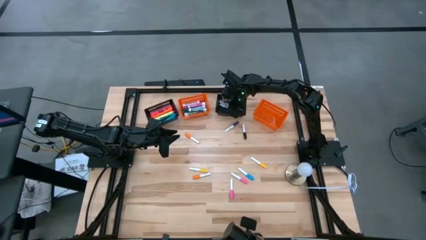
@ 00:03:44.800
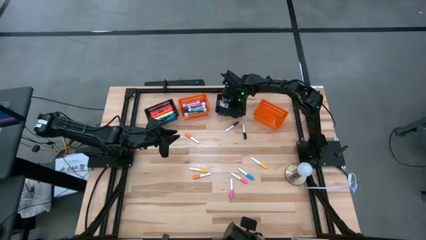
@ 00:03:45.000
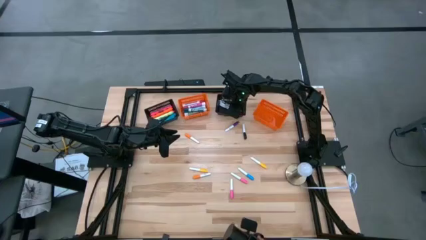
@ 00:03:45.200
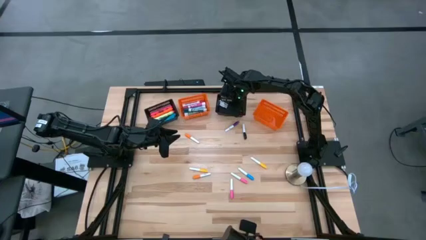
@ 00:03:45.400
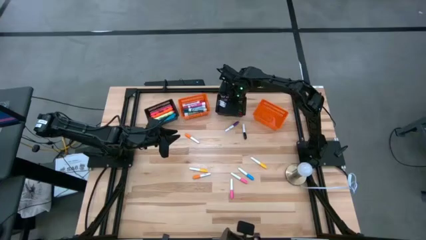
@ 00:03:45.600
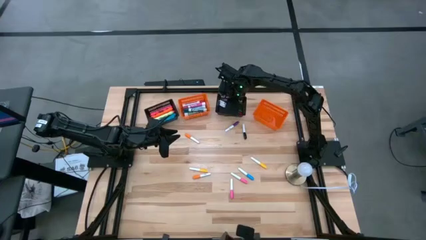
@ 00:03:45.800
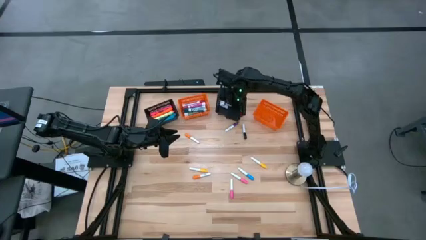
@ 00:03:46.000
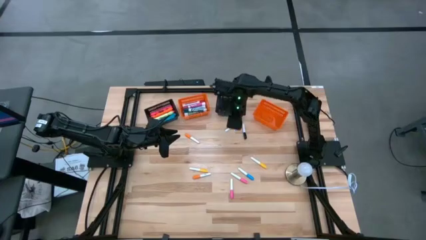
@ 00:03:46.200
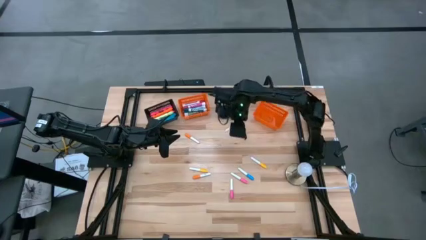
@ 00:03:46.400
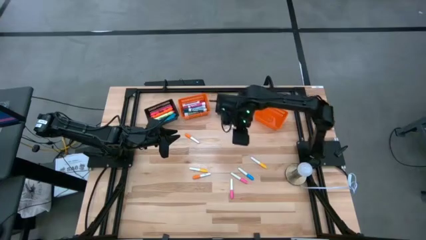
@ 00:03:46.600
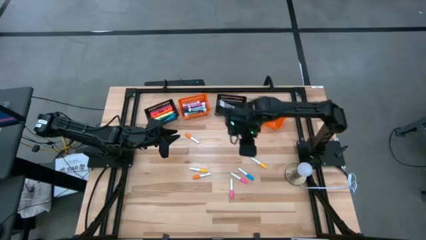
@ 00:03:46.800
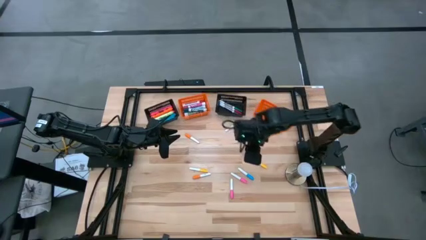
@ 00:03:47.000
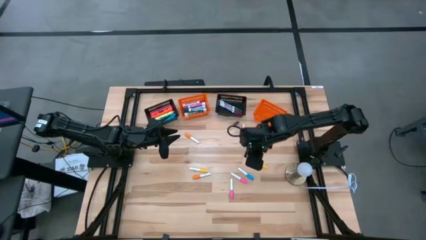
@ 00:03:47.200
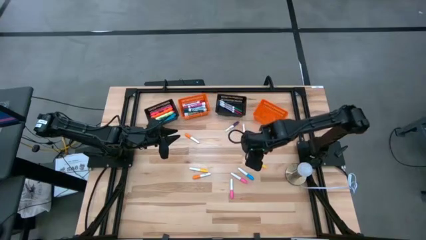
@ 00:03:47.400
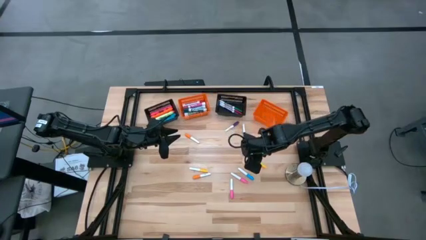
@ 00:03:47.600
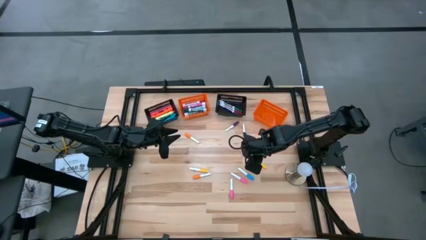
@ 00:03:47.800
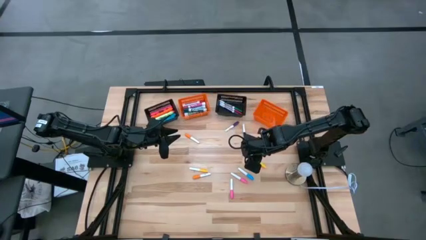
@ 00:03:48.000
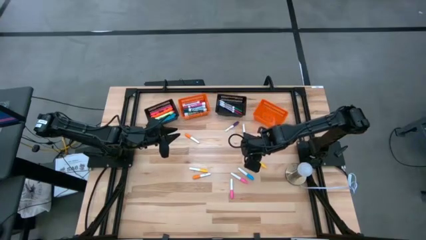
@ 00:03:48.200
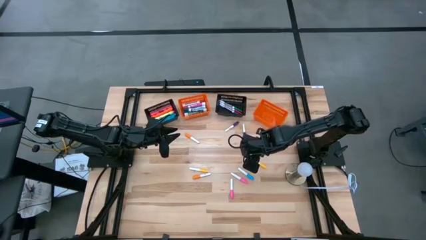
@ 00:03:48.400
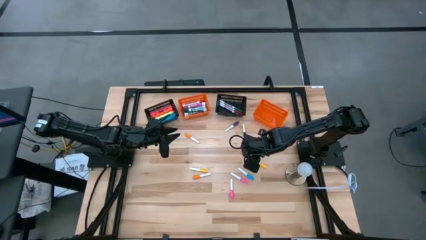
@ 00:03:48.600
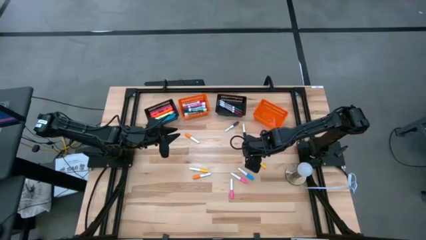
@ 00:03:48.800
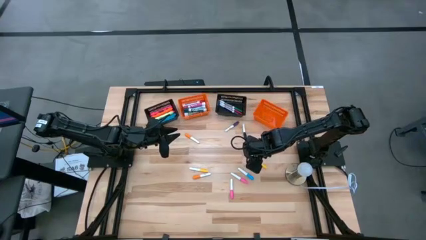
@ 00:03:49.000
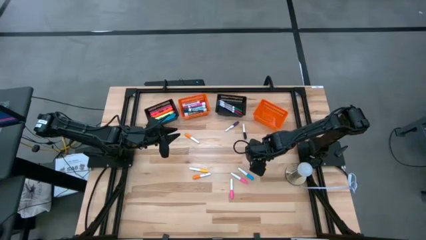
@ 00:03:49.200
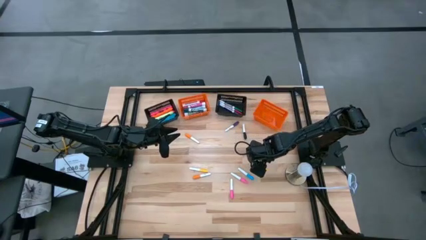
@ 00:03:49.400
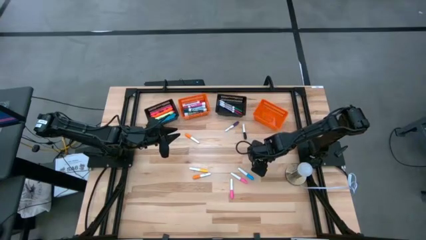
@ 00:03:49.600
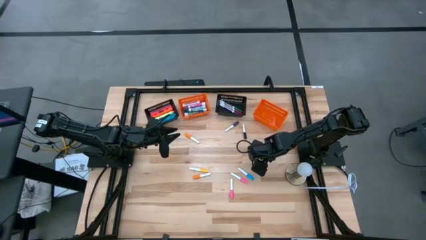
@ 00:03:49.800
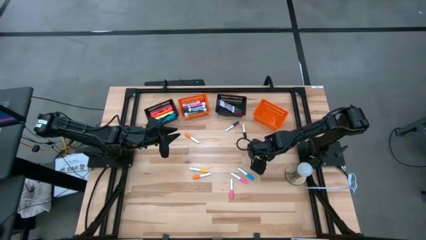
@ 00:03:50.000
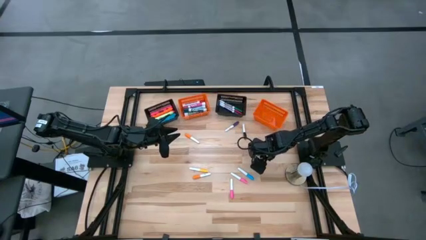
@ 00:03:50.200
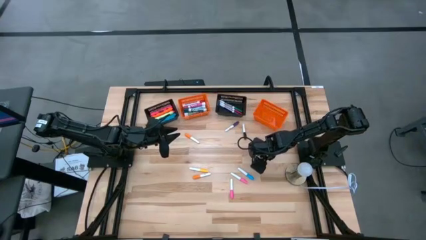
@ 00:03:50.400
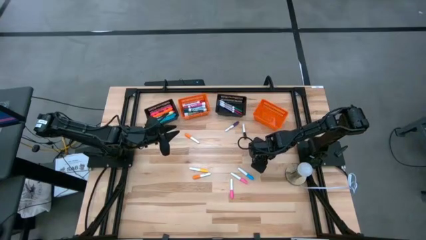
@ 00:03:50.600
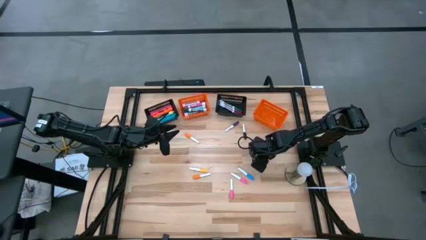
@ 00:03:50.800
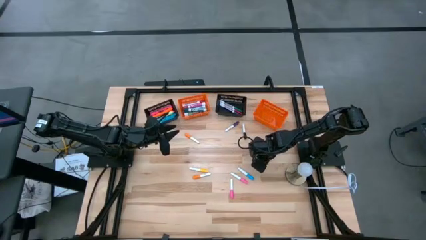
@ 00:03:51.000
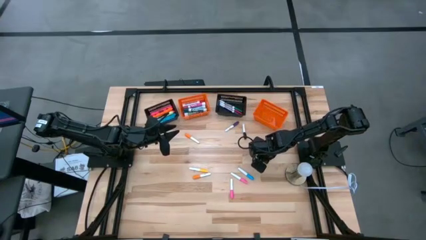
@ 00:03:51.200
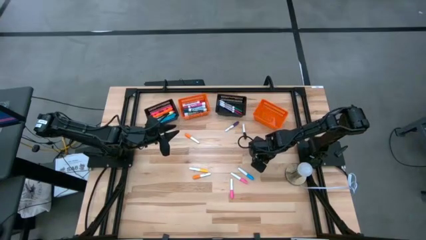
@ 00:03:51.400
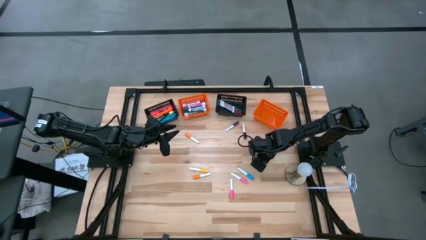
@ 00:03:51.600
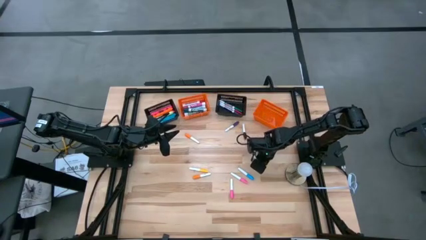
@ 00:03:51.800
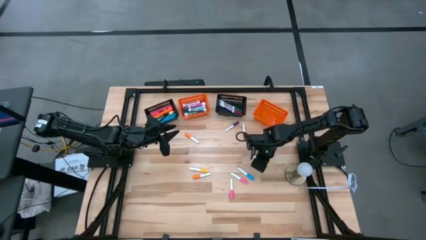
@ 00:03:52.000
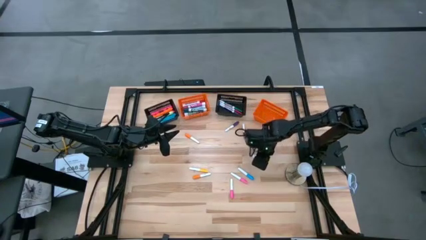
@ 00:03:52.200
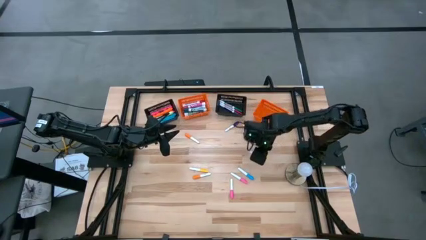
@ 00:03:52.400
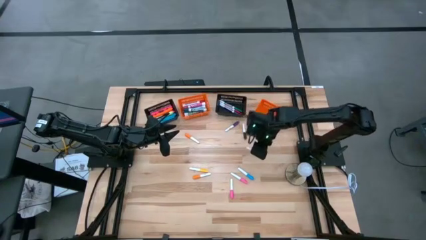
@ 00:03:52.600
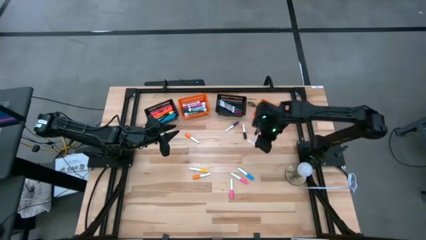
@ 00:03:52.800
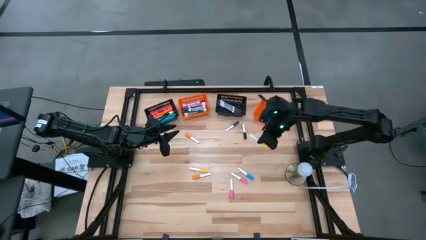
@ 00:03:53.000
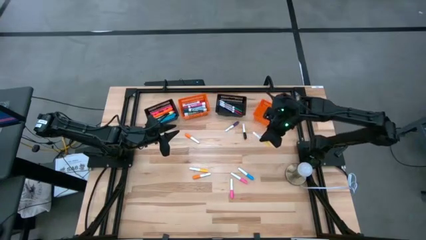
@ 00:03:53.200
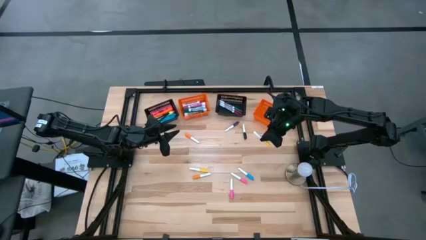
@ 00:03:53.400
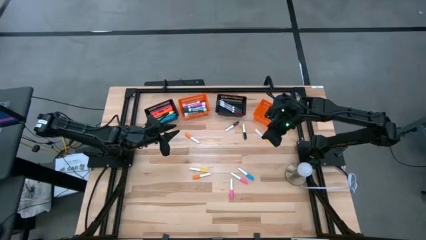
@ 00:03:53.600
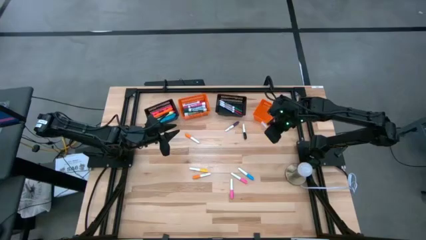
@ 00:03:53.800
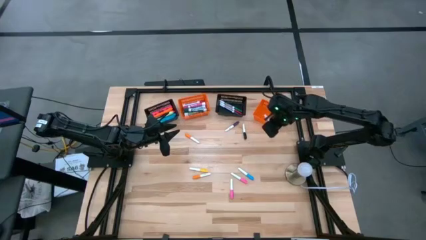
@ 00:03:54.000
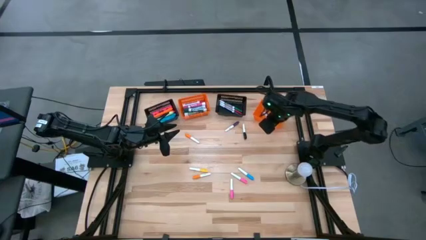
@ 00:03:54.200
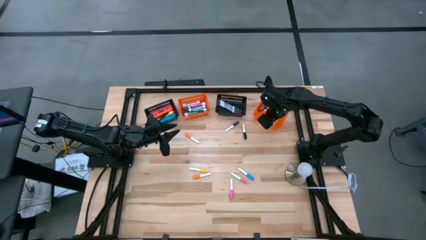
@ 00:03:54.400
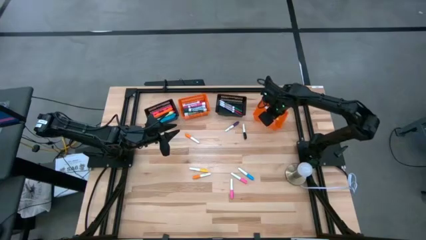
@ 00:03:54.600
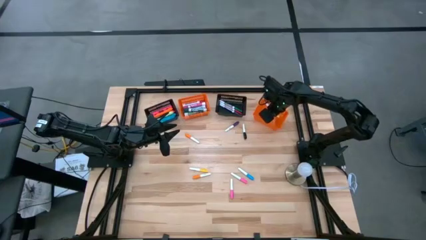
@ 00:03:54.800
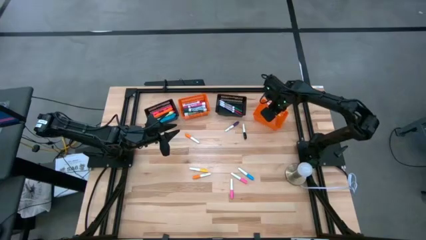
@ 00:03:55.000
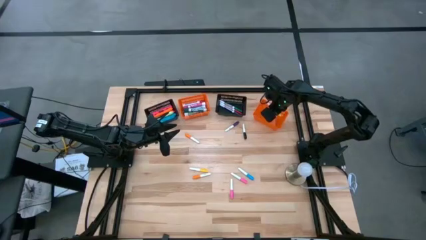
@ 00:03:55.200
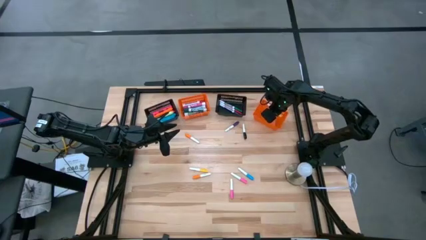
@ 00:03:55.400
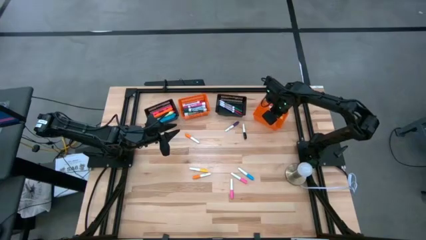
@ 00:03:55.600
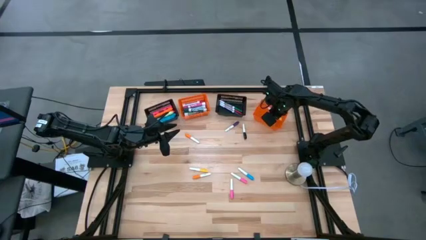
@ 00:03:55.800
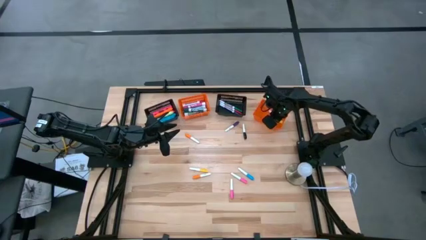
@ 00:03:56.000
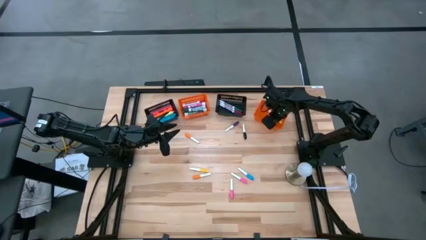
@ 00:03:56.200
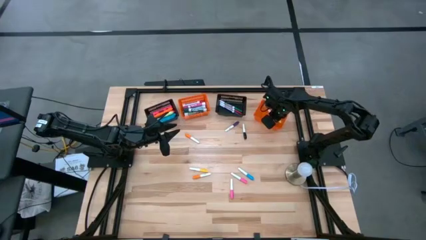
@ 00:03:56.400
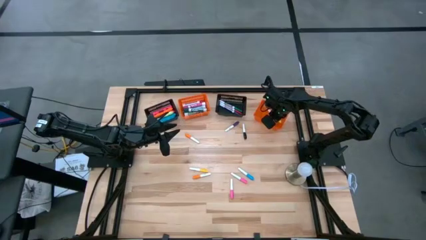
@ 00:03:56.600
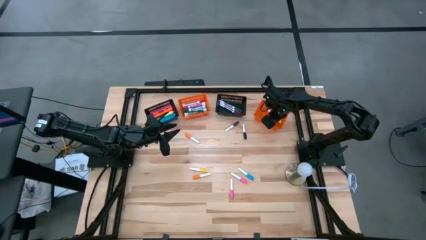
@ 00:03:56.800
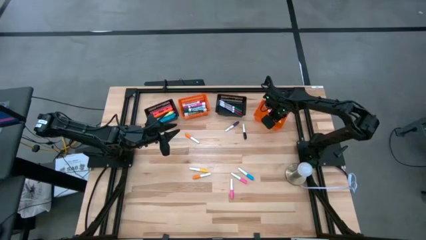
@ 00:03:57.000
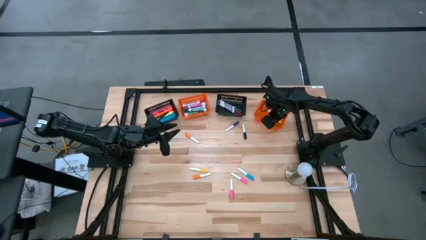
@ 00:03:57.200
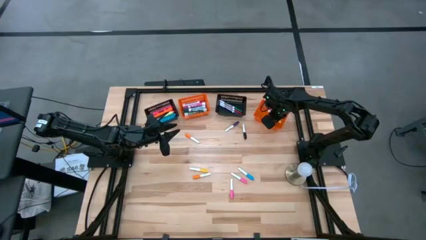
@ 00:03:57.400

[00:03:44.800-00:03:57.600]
Task: Pick & Place Markers
Put the right yellow small highlighter pen into the left orange bin

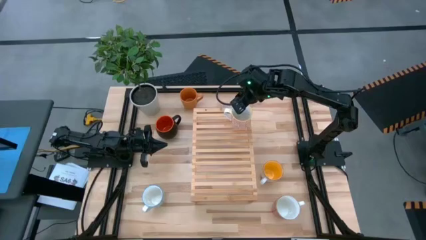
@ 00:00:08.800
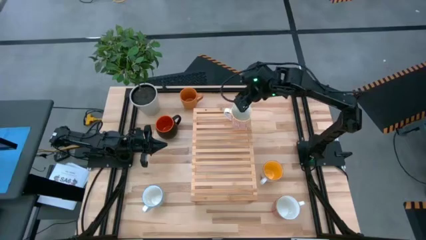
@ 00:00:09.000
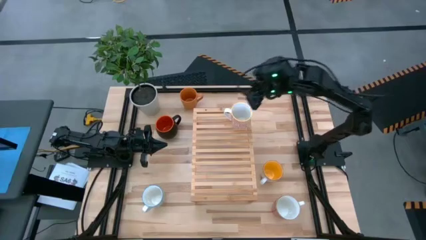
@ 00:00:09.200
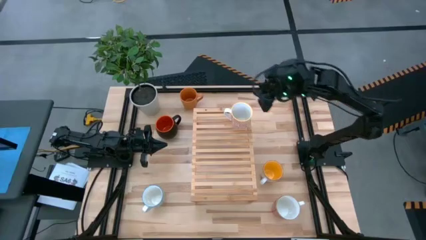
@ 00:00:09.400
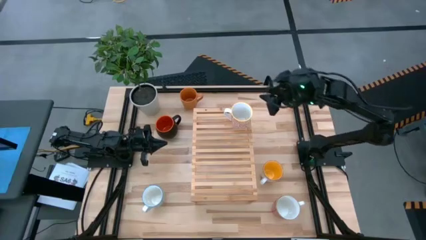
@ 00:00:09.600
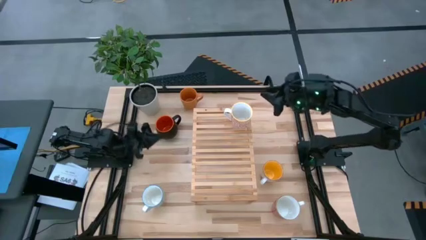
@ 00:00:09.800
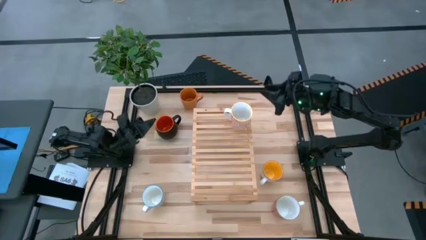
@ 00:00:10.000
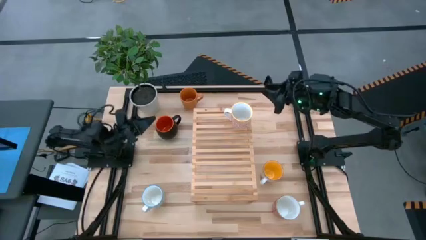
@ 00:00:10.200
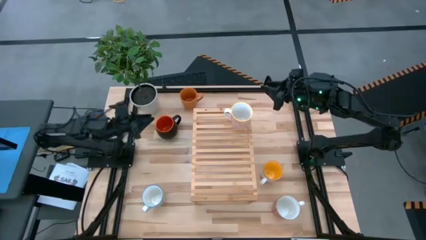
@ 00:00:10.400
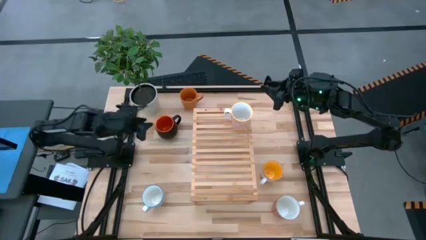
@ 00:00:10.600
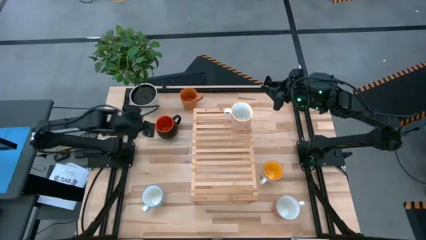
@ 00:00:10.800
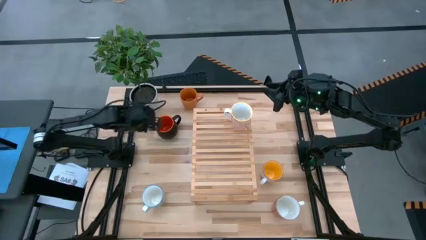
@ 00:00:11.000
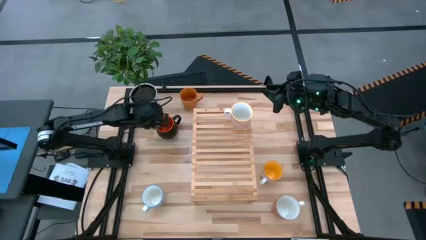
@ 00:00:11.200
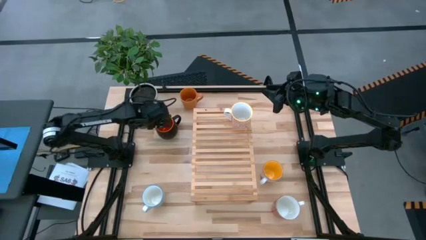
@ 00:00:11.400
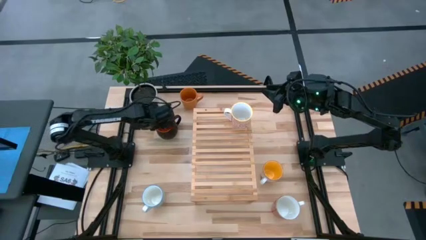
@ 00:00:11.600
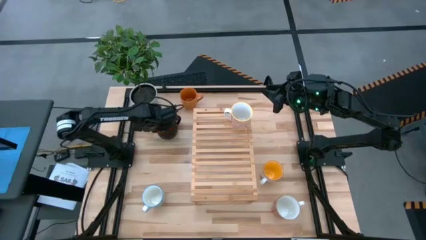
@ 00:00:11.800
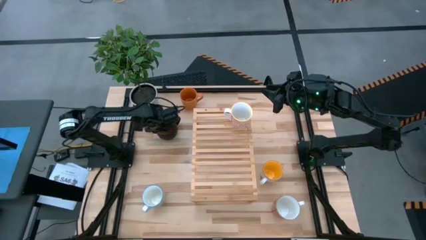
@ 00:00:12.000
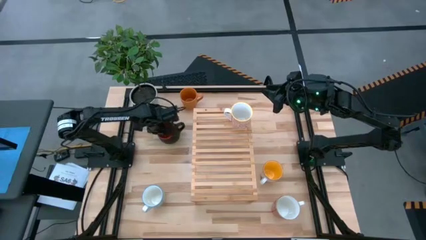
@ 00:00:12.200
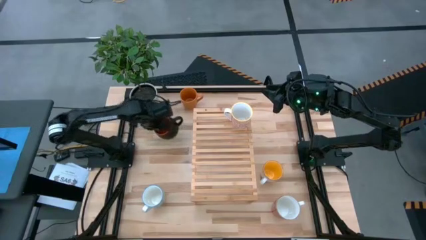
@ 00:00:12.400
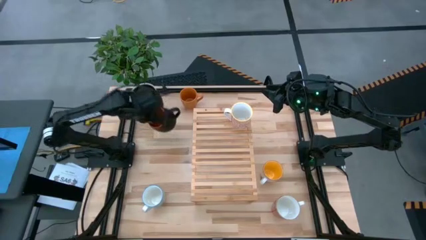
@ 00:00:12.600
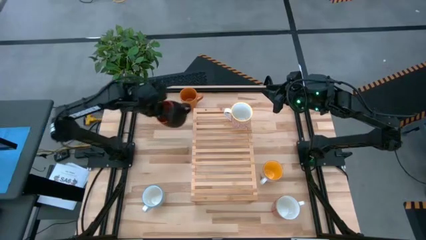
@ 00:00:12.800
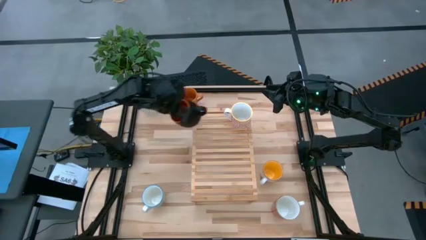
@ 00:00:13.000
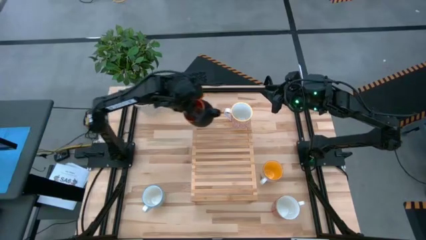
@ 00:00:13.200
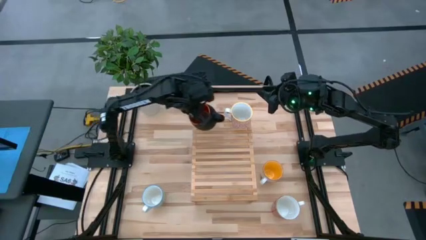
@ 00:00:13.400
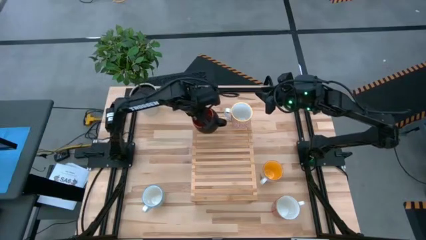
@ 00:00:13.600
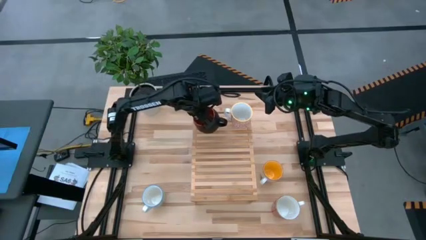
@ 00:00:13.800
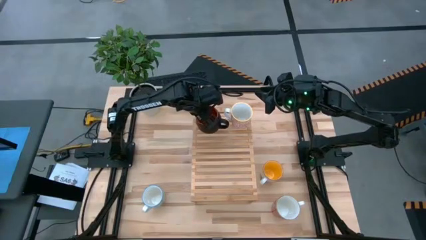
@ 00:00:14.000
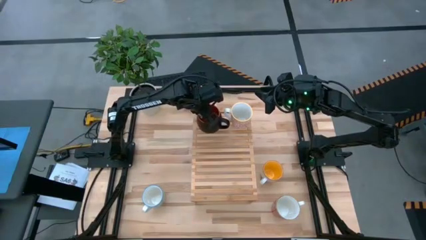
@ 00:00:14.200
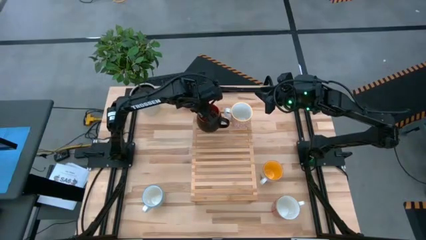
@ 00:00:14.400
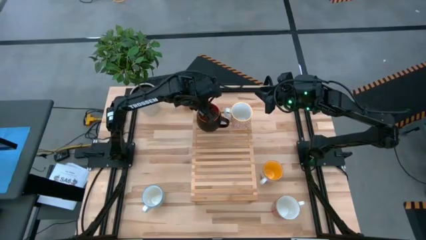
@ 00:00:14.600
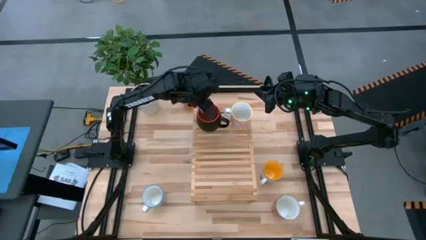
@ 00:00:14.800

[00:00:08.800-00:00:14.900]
Task: Place coffee mugs
Put the black mug on the shelf
